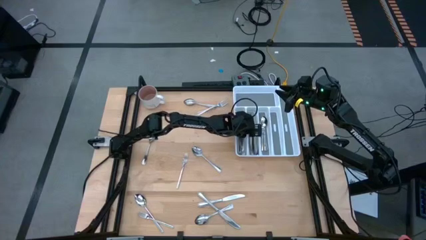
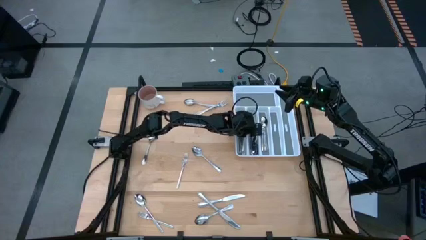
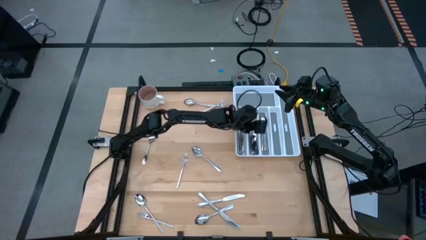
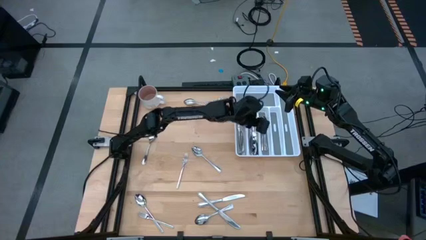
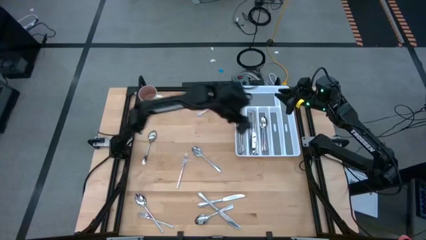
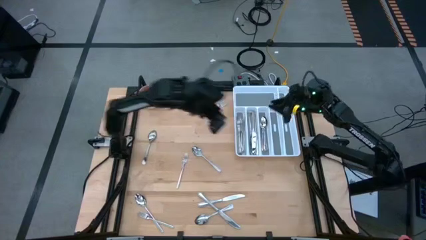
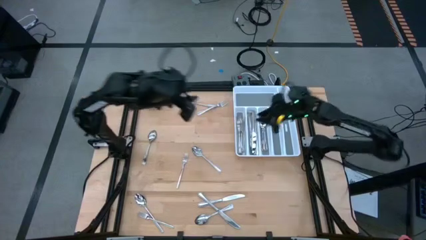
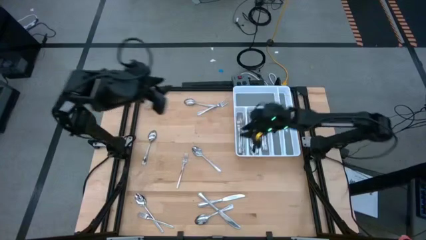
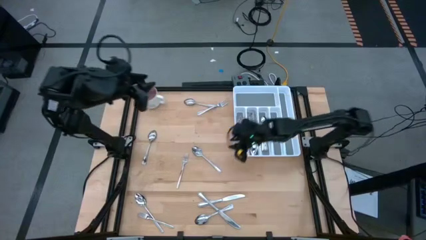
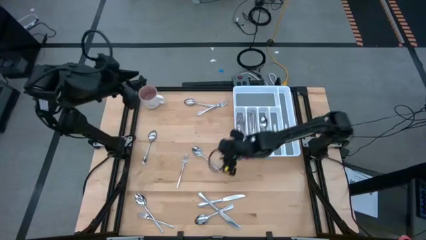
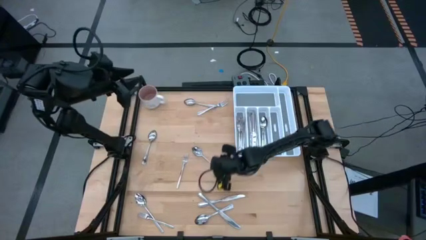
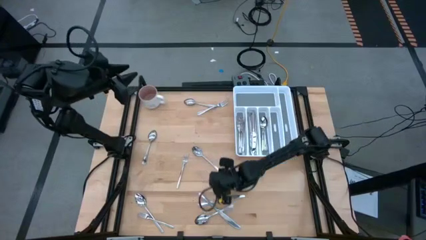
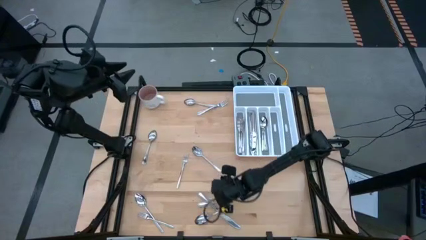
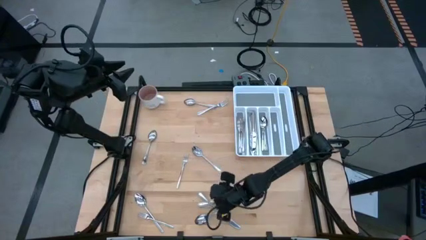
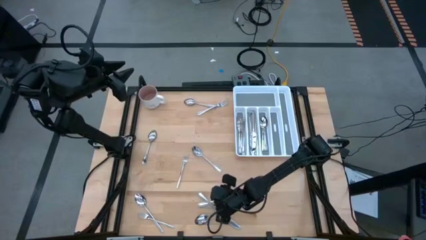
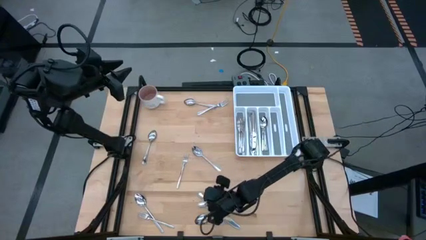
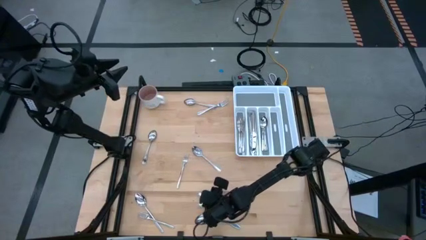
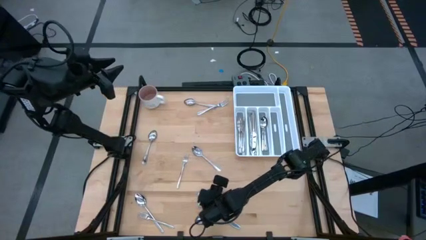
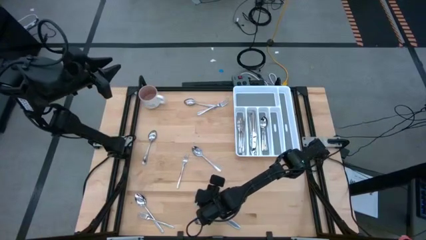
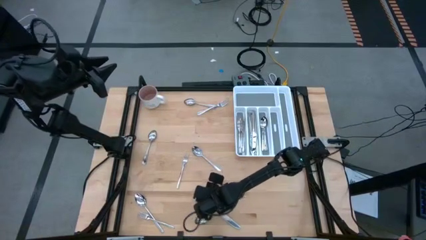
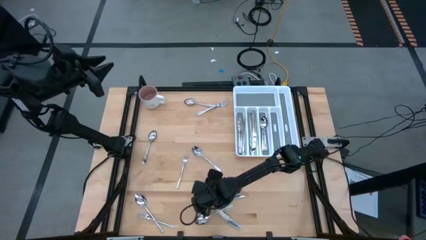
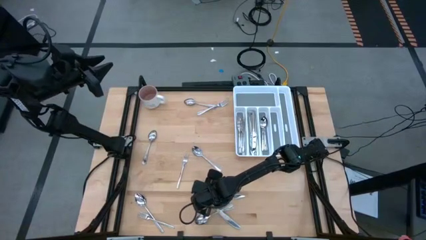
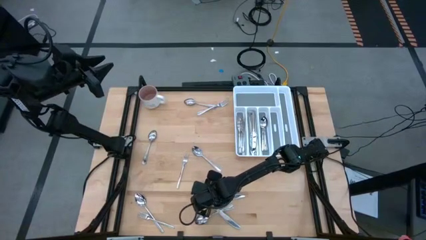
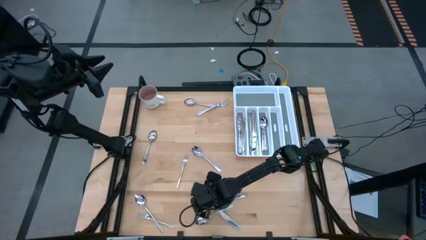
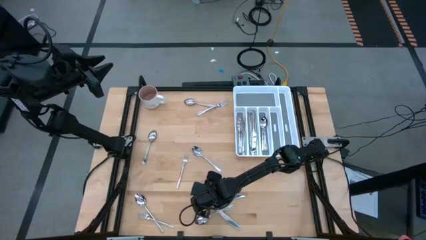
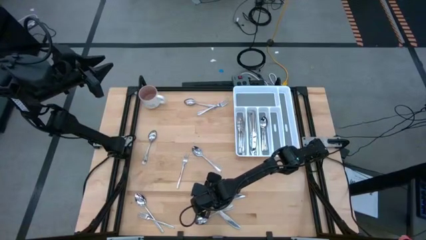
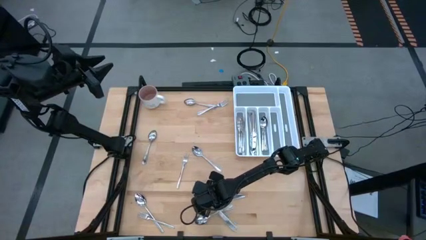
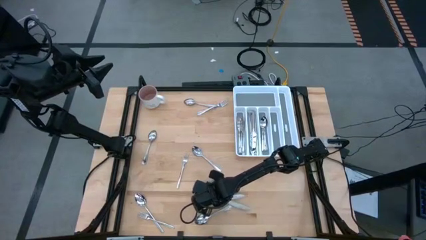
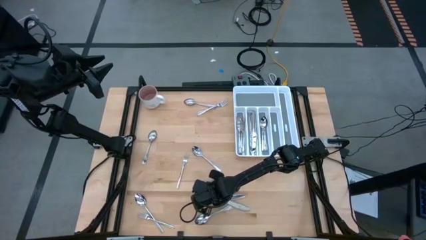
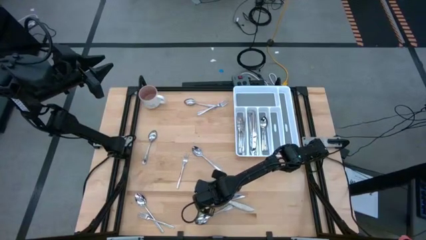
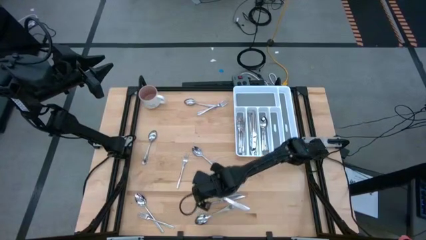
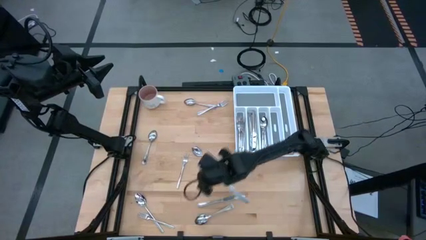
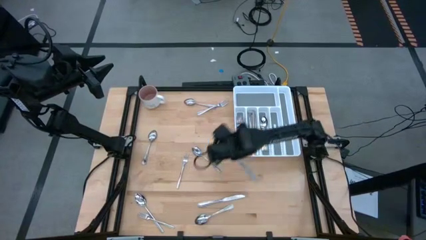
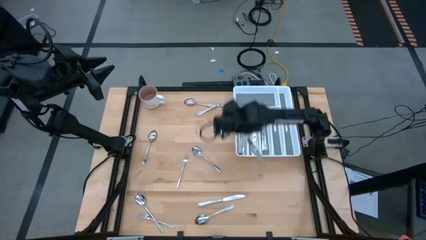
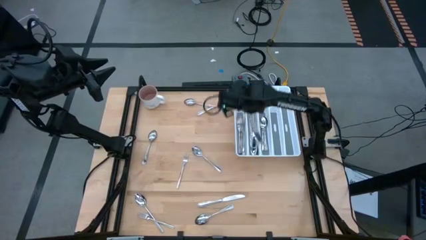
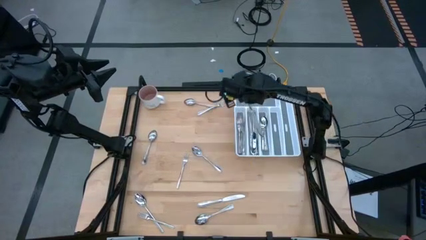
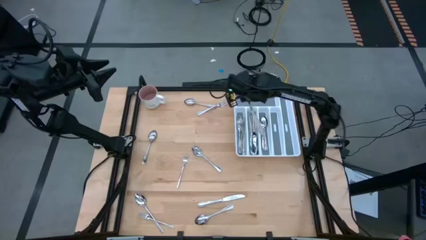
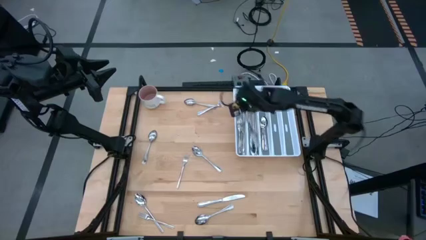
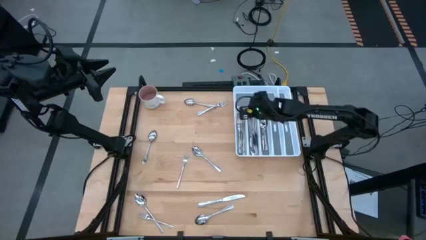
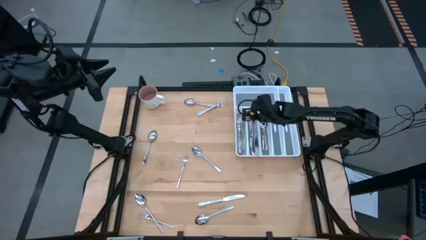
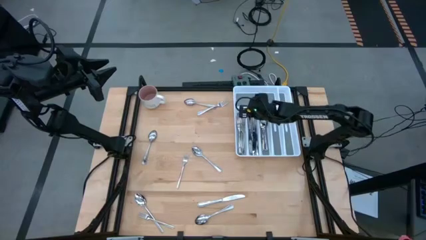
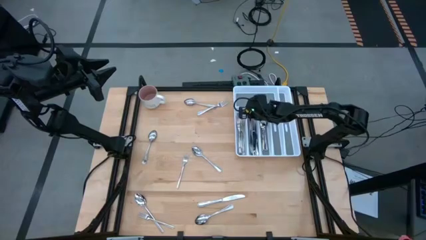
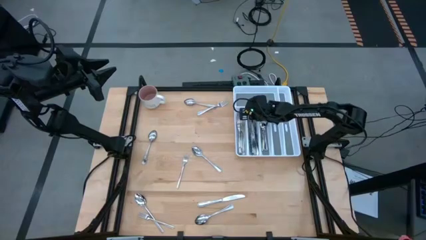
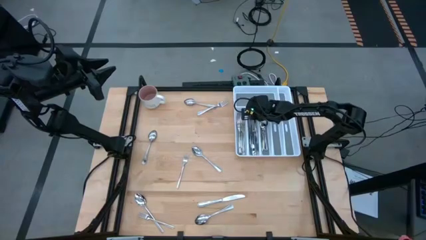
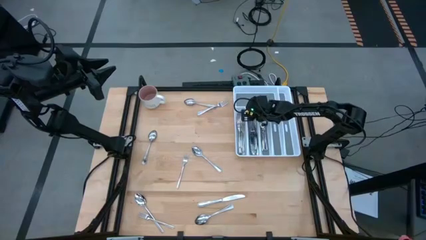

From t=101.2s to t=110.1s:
Task: Sort silverware
Put the silver knife into the middle left slot of the white silverware tray

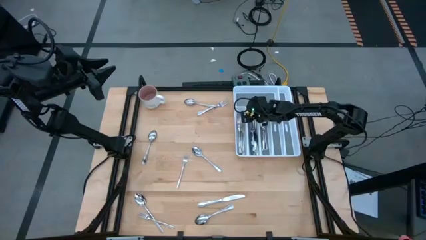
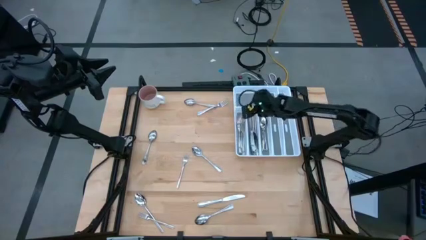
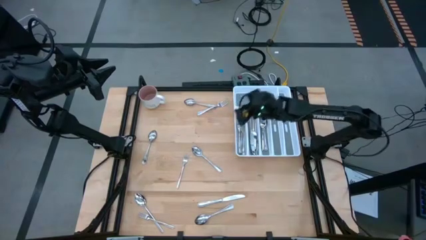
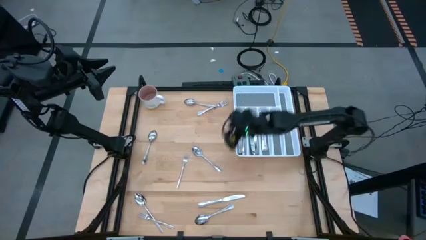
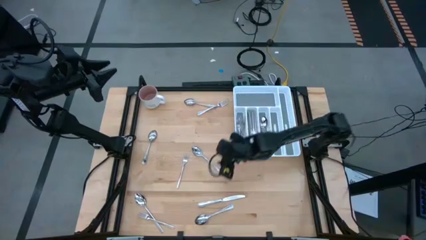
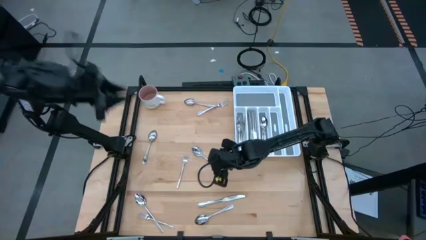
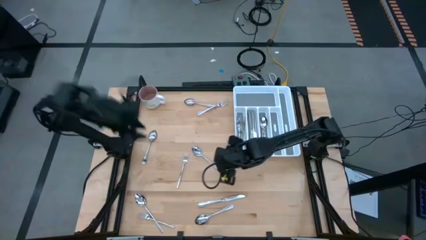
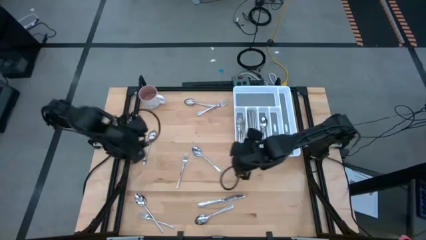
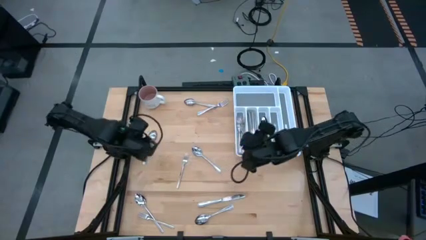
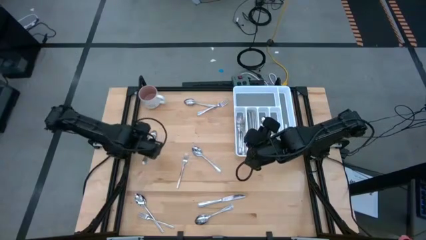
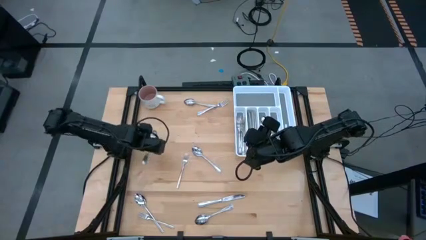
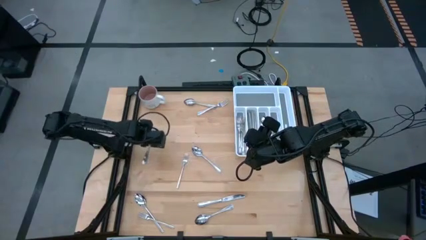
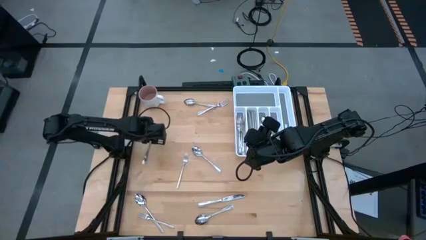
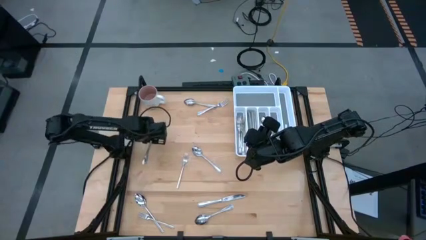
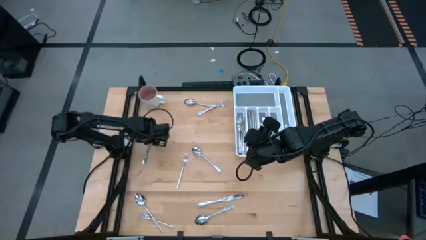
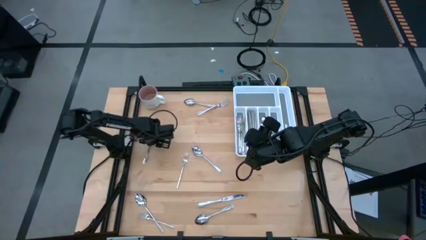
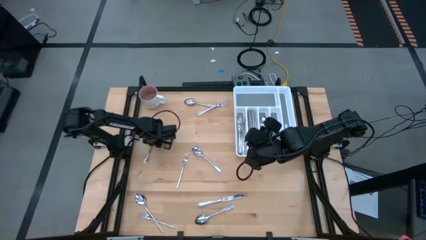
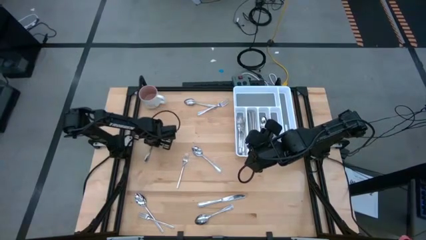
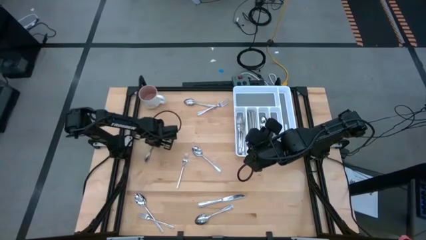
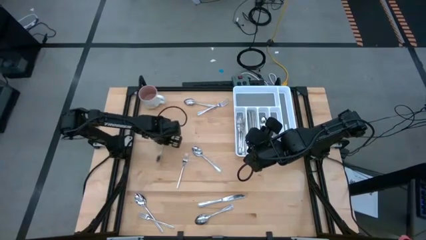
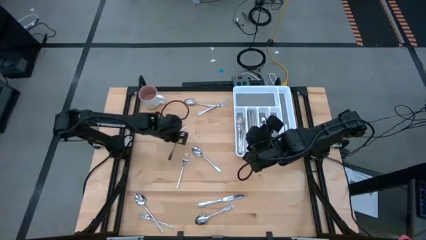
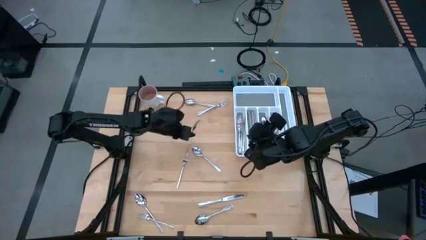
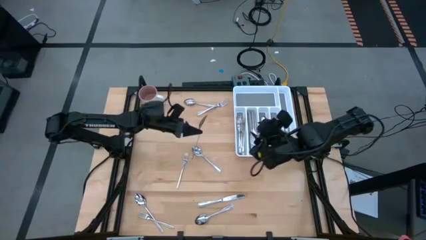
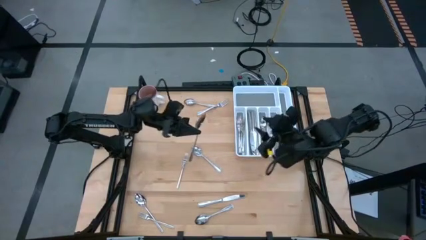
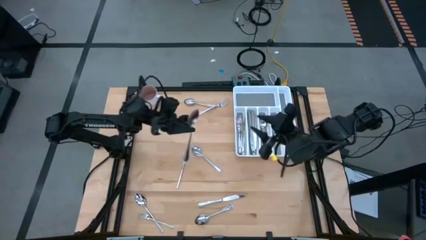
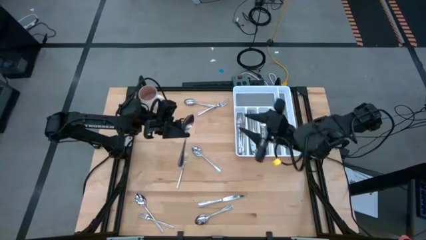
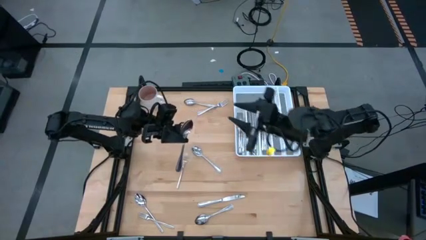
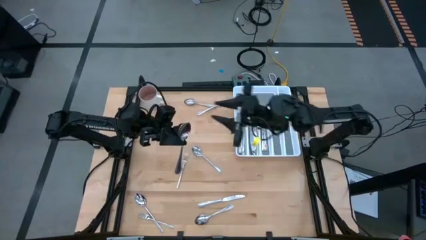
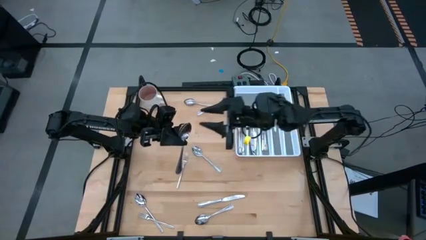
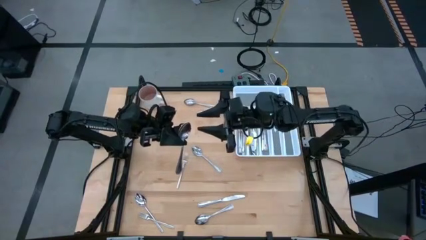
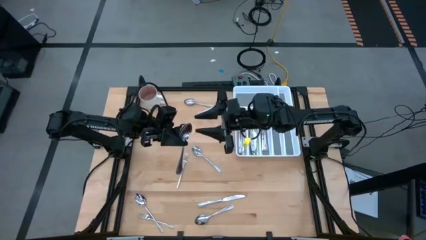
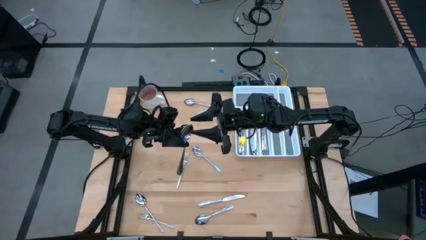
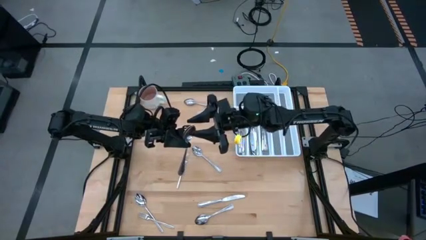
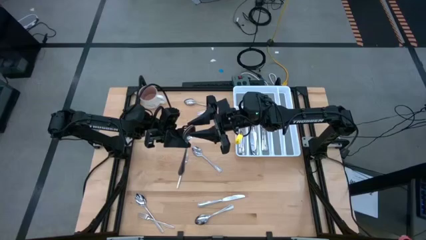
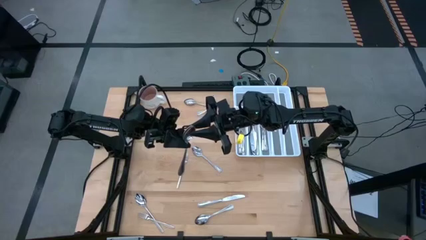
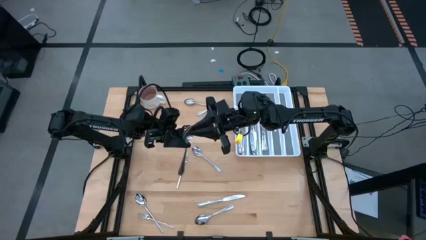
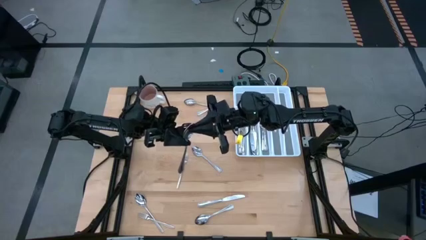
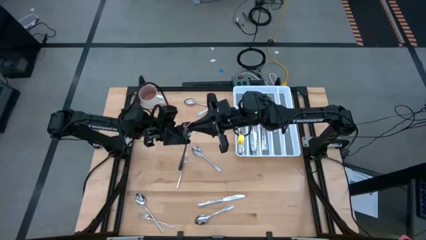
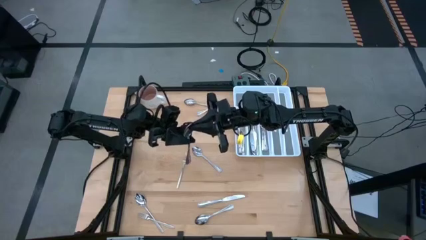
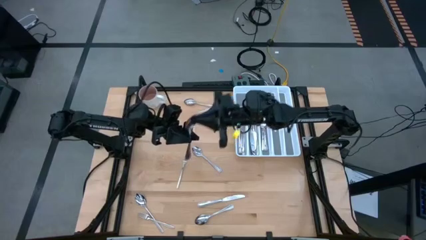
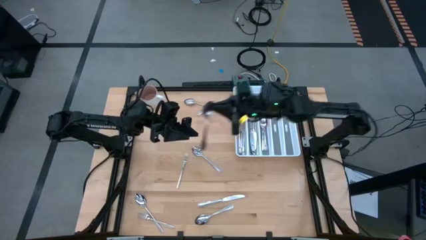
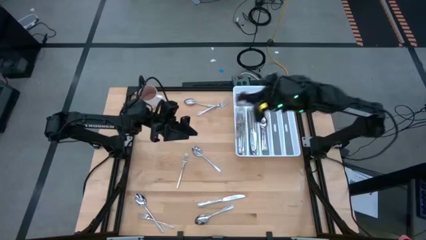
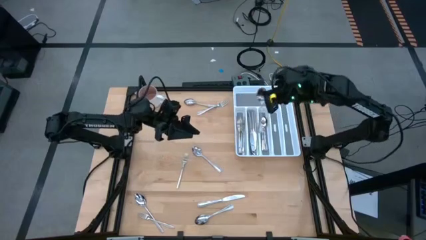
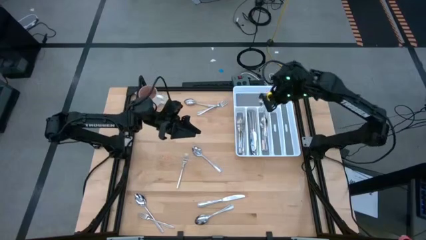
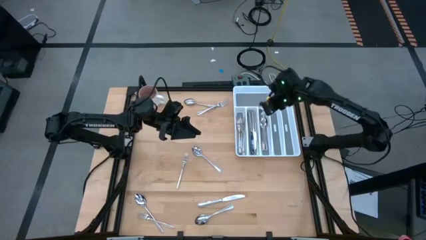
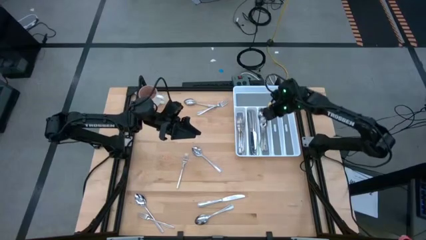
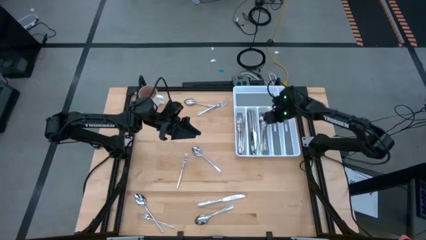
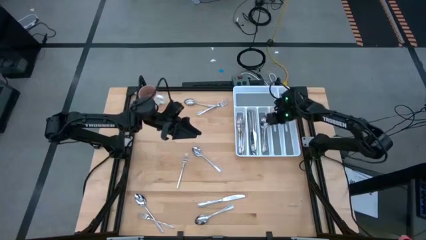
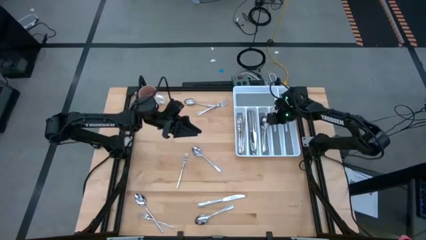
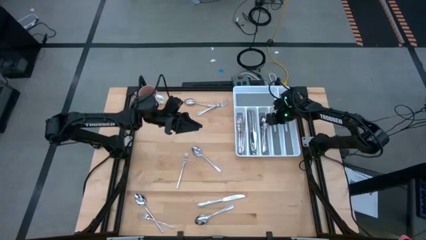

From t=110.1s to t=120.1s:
Put the silver spoon into the middle right slot of the white silverware tray
